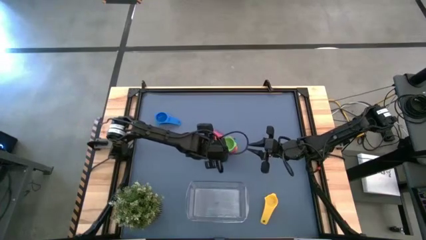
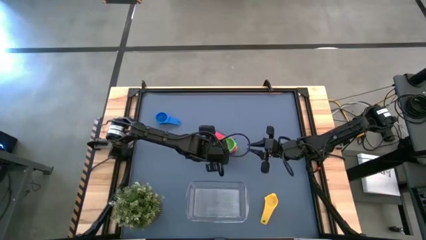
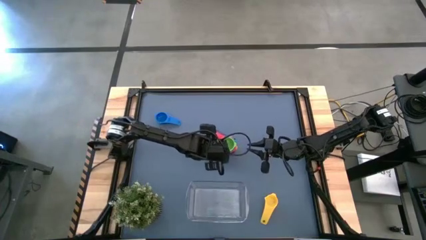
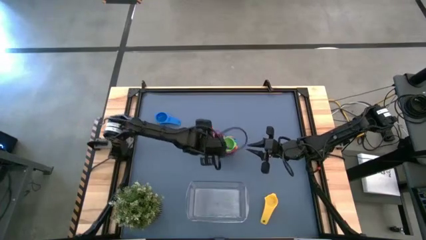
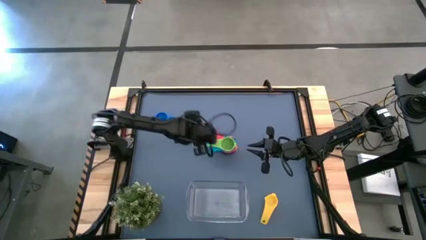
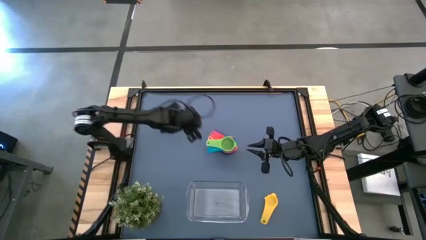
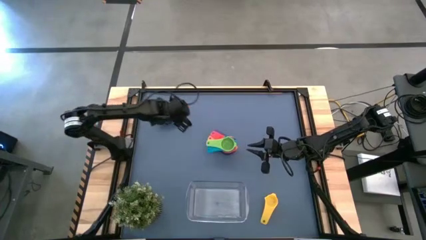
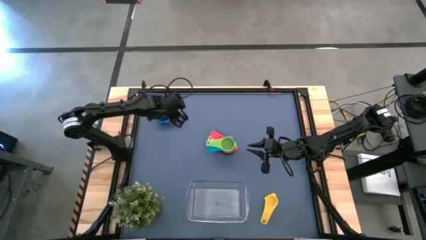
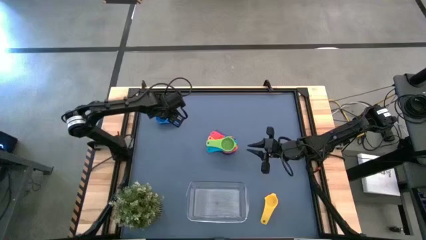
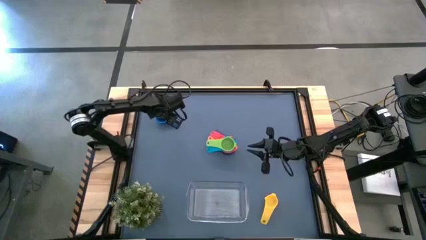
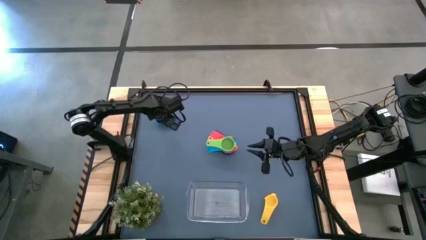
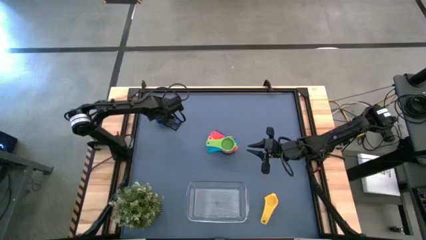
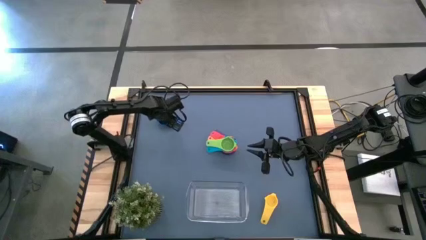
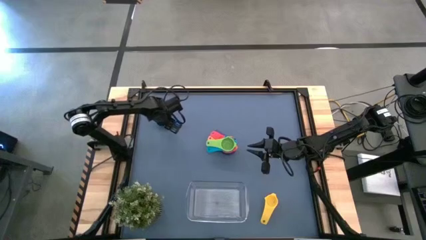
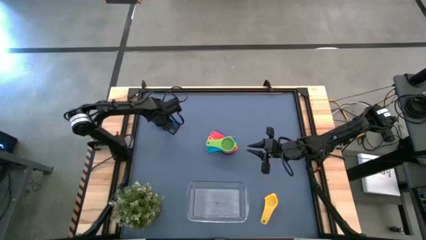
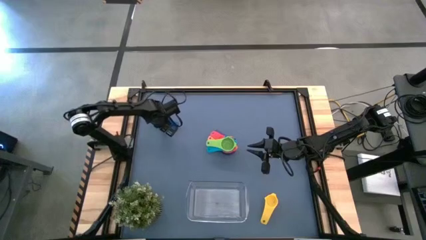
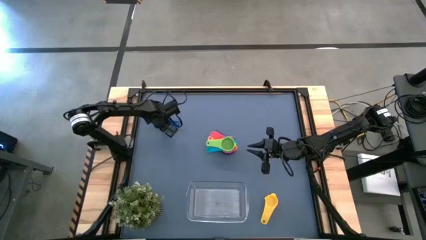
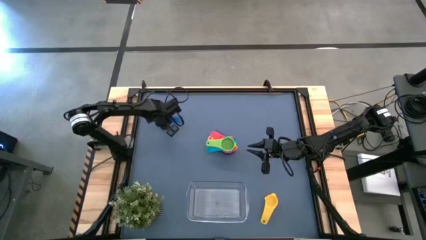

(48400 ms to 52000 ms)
Task: Nest measuring cups in basket
Stack the blue measuring cup on top of the green measuring cup

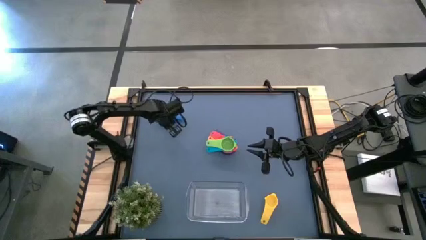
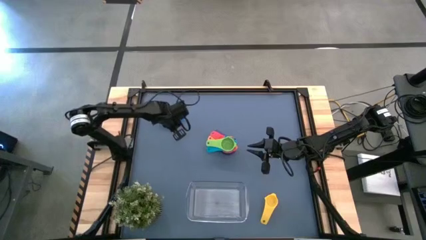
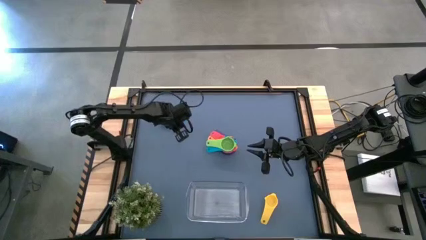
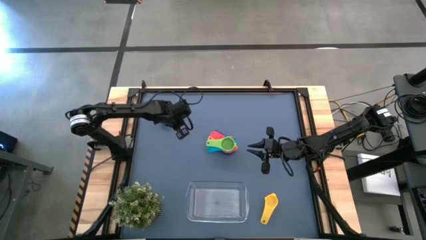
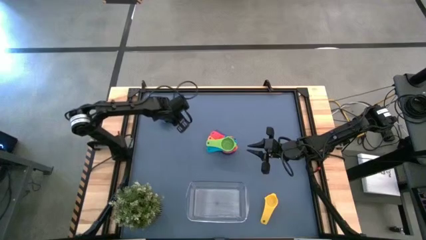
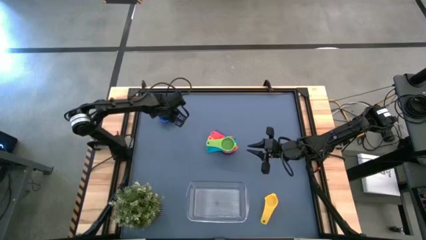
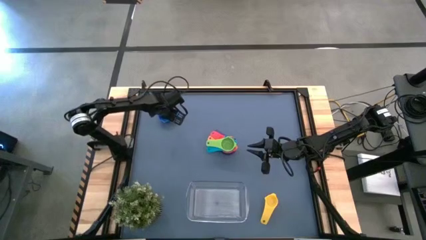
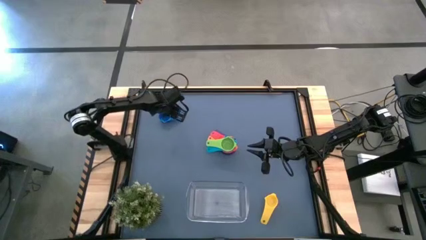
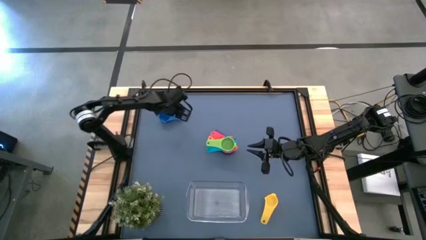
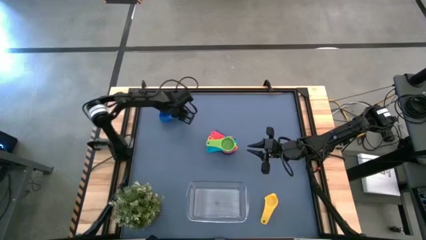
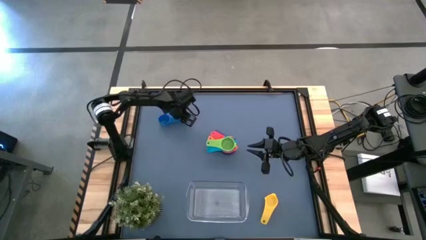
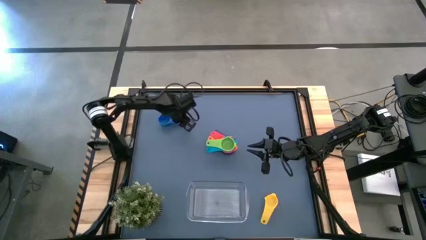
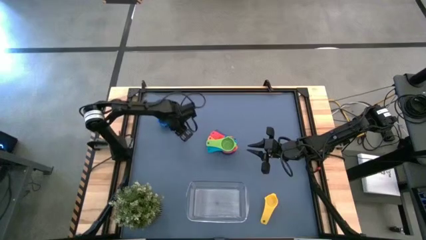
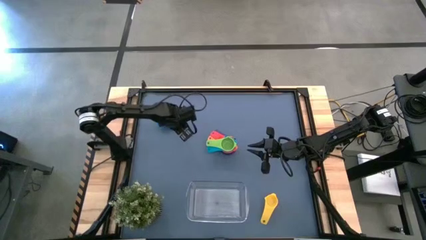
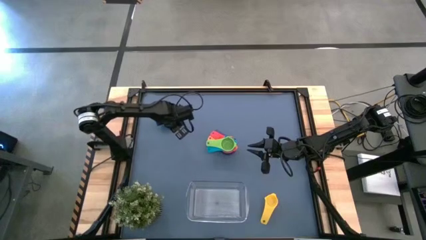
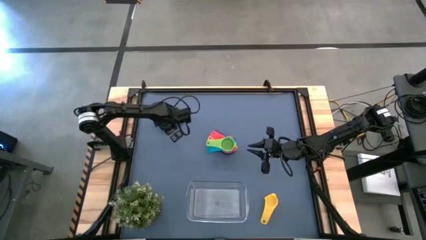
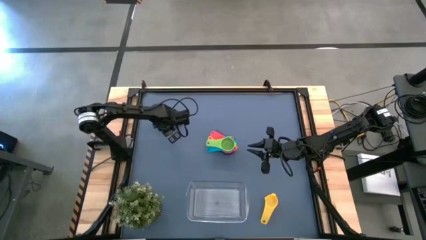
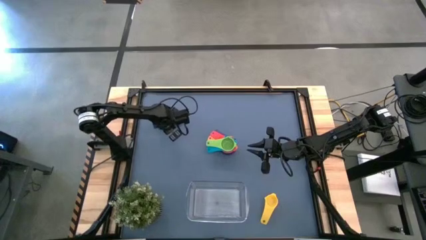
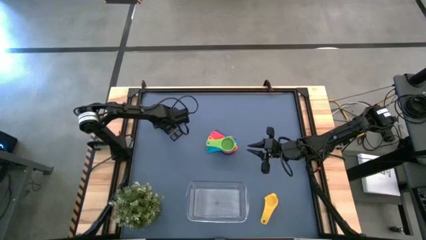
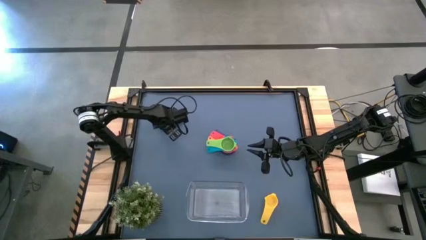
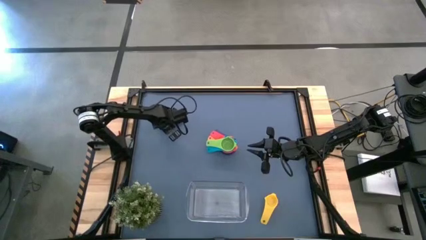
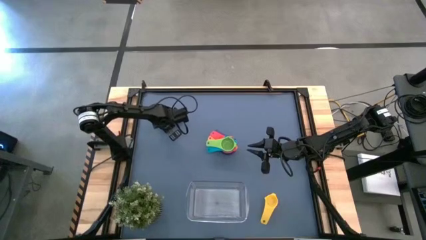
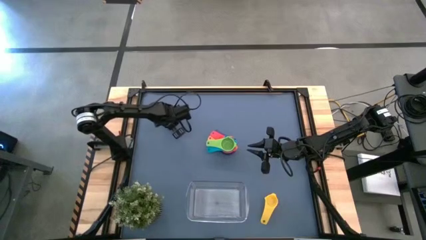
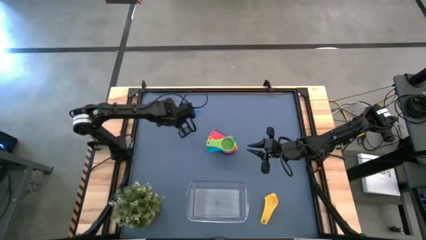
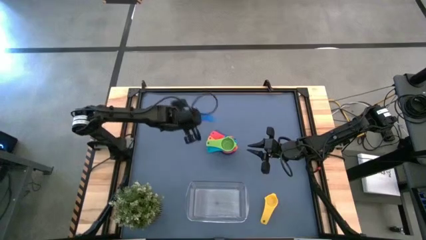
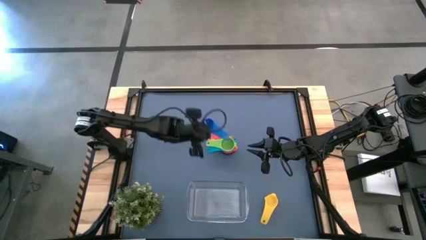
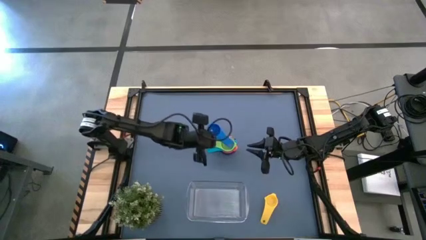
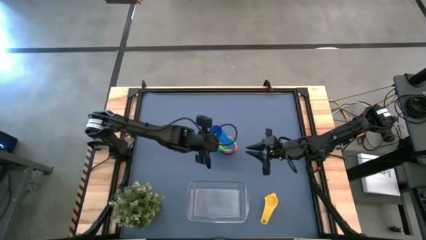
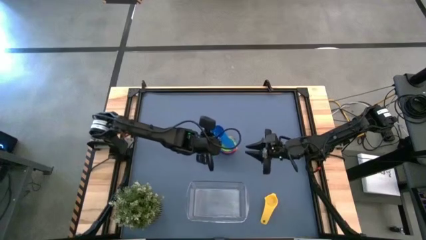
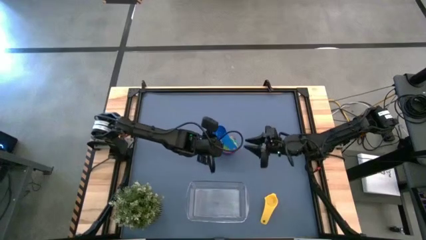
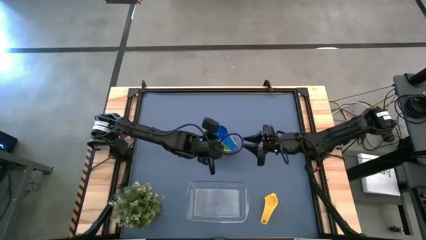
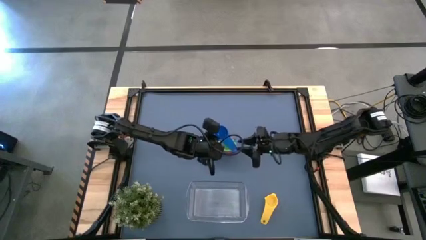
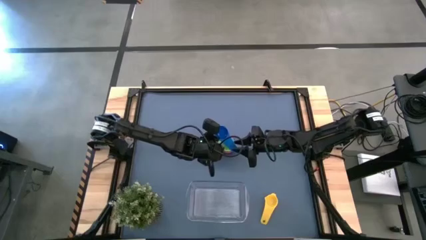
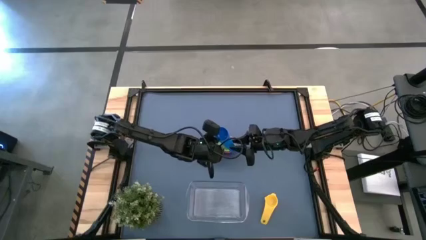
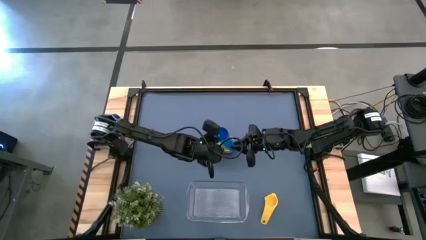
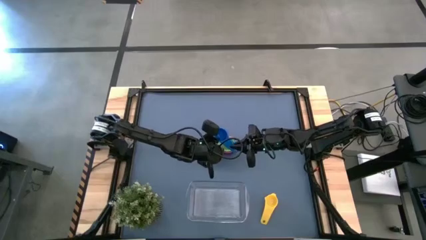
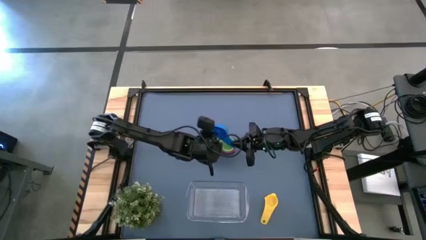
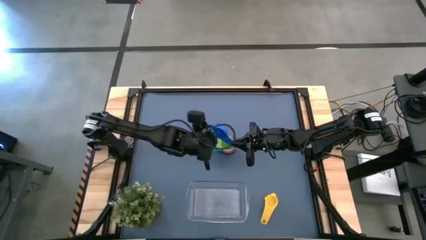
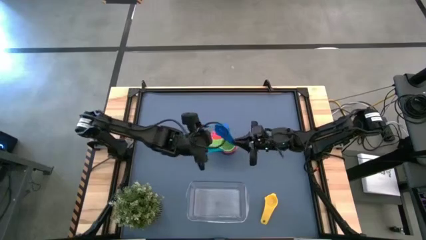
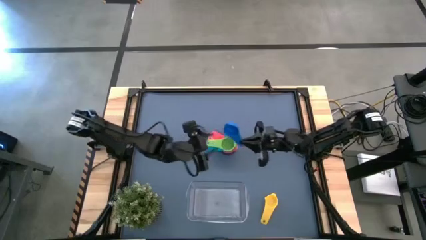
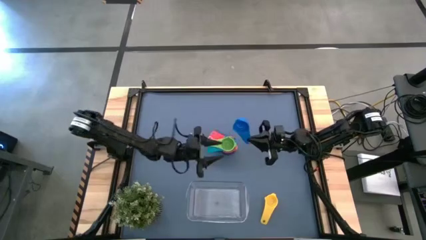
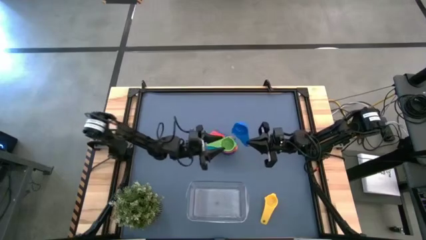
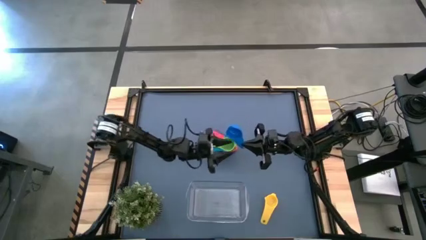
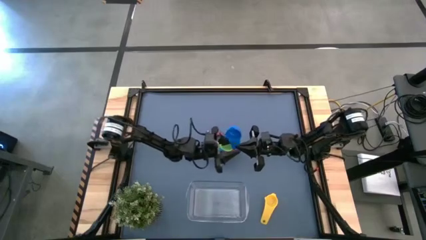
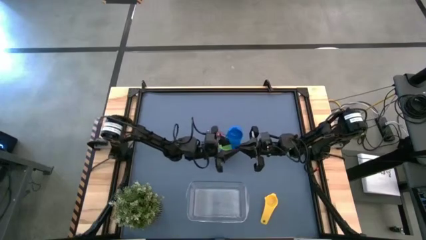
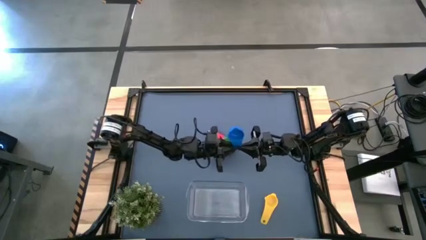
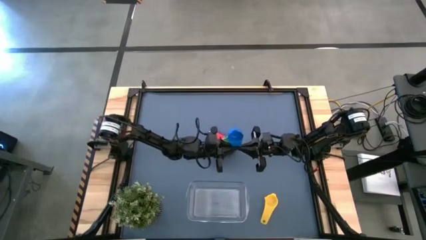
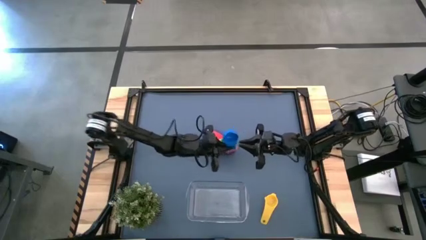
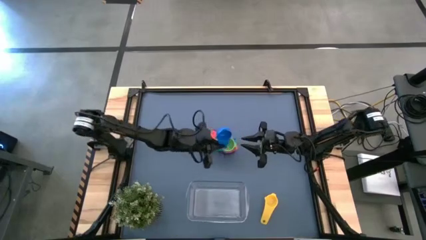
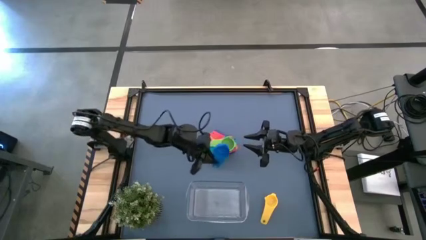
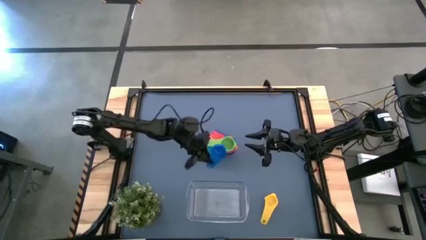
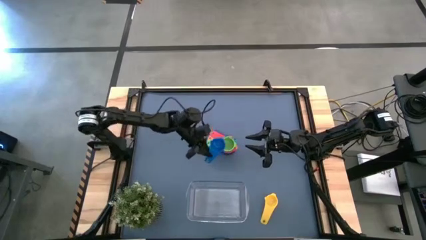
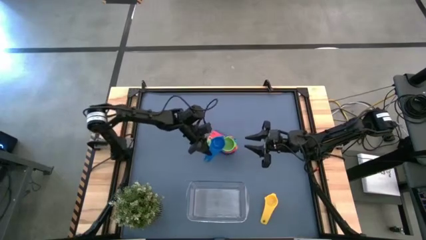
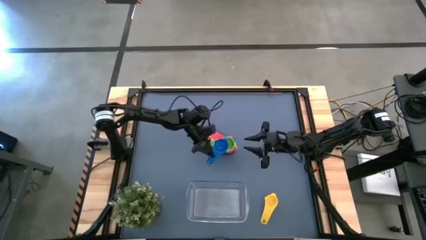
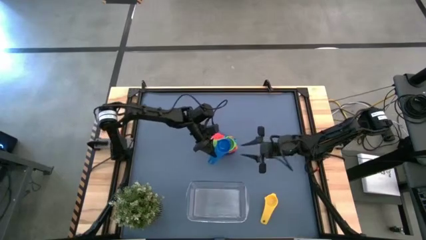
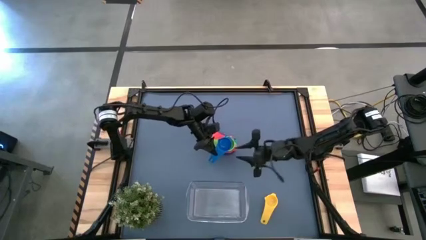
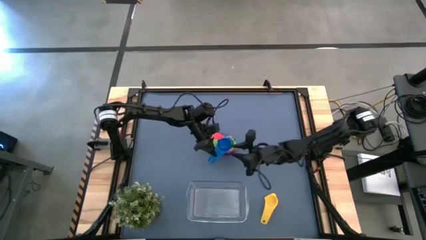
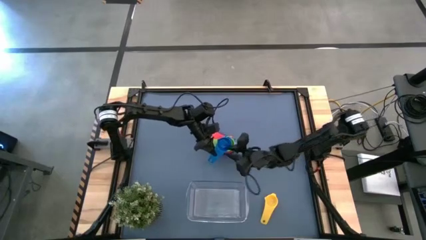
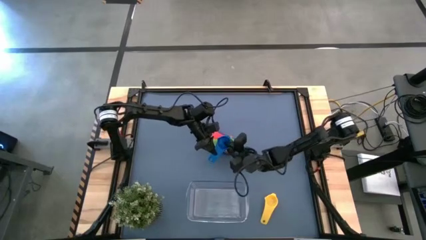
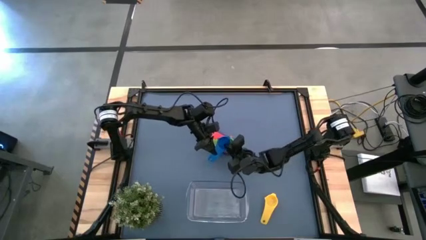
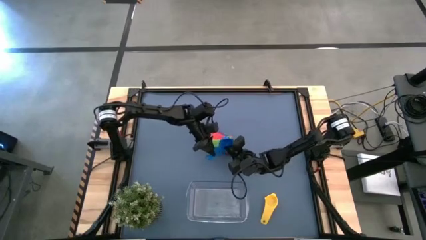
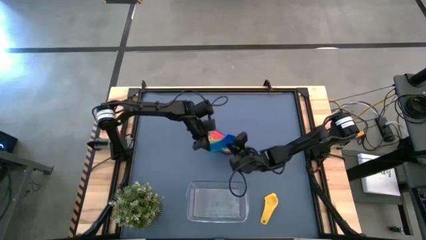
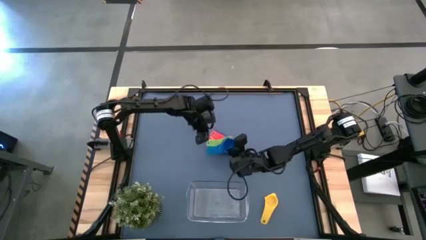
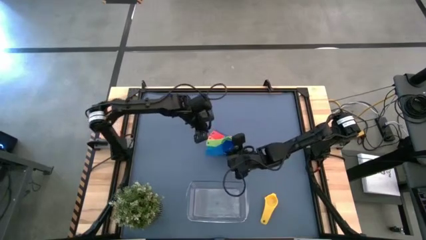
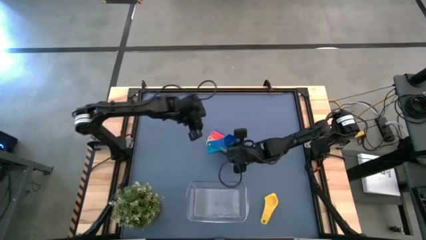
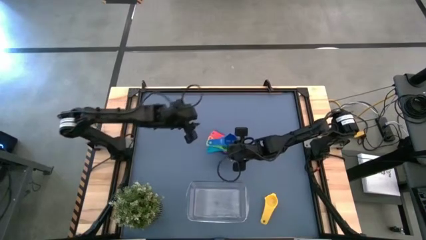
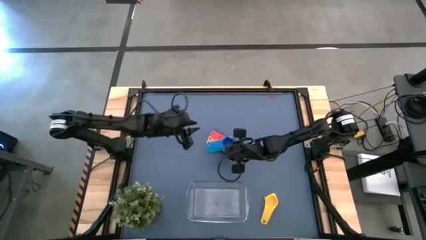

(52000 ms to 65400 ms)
Stack the blue measuring cup on top of the green measuring cup
